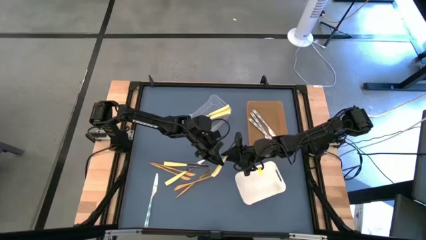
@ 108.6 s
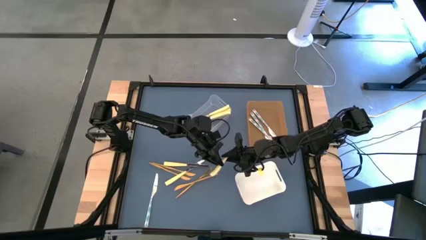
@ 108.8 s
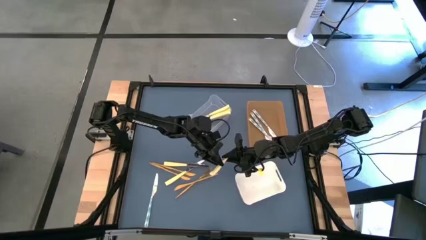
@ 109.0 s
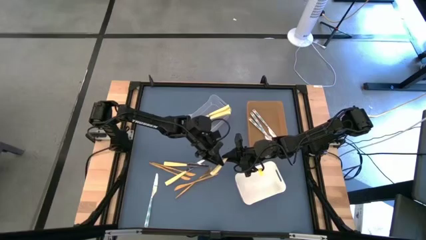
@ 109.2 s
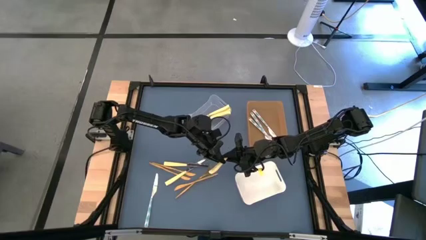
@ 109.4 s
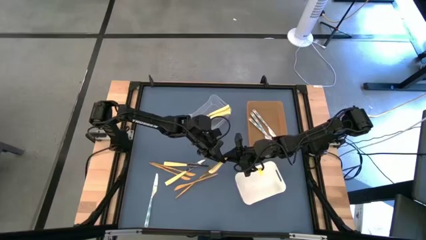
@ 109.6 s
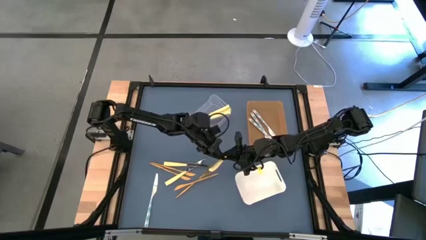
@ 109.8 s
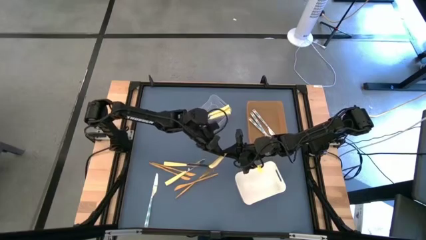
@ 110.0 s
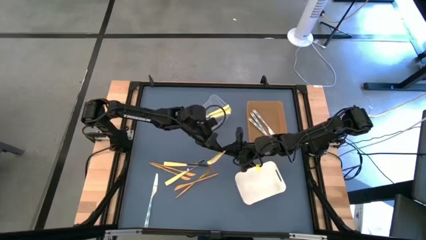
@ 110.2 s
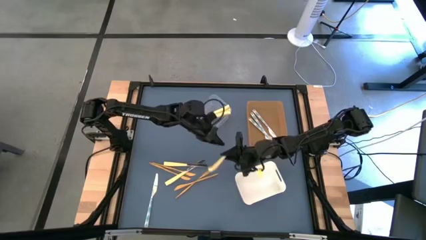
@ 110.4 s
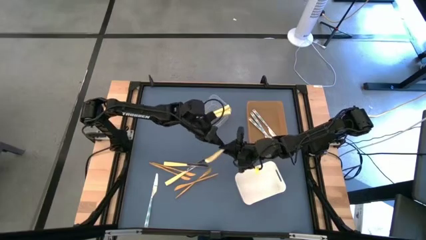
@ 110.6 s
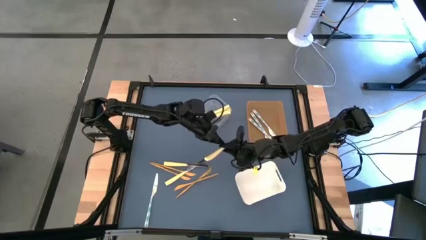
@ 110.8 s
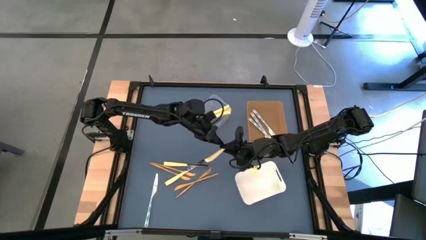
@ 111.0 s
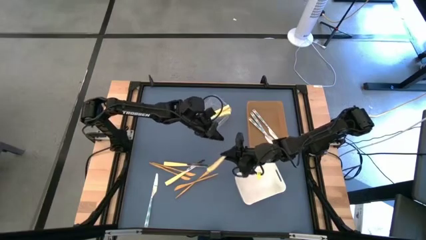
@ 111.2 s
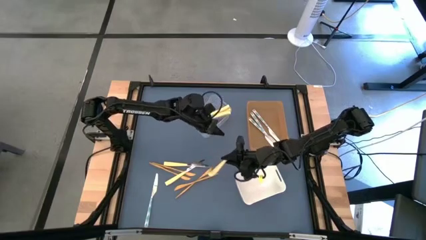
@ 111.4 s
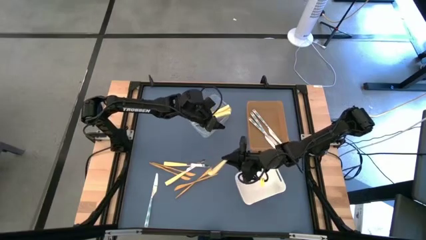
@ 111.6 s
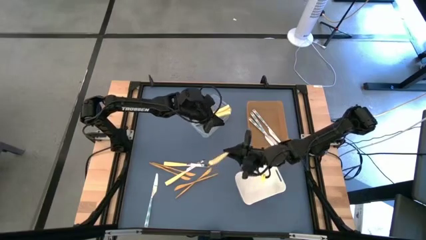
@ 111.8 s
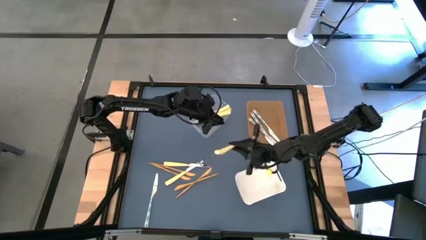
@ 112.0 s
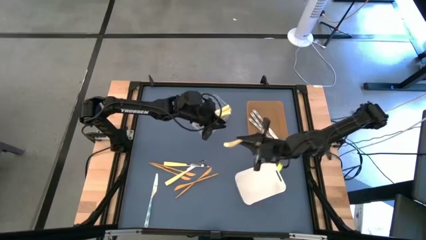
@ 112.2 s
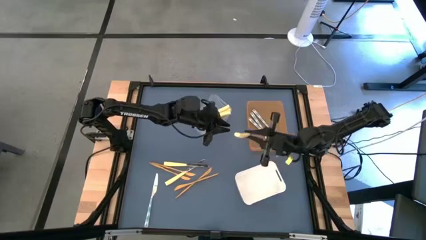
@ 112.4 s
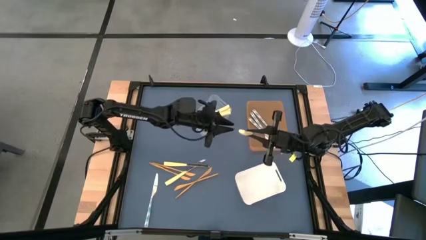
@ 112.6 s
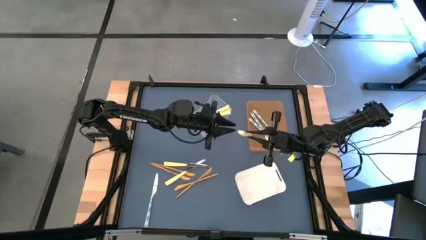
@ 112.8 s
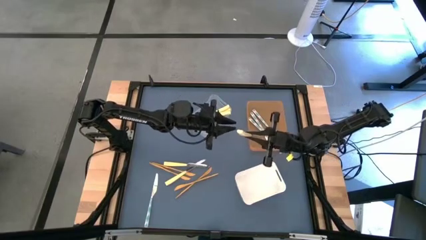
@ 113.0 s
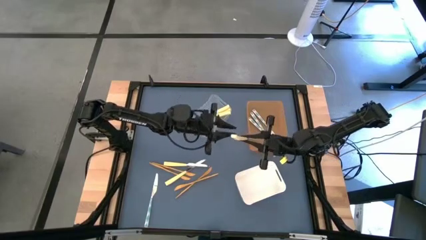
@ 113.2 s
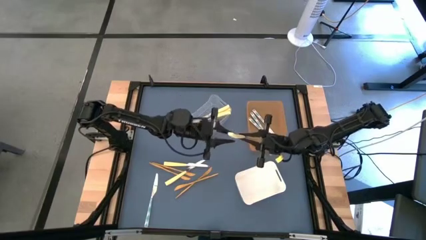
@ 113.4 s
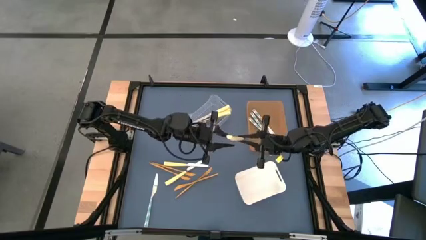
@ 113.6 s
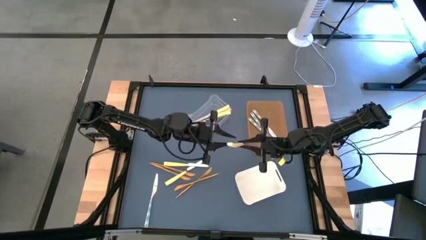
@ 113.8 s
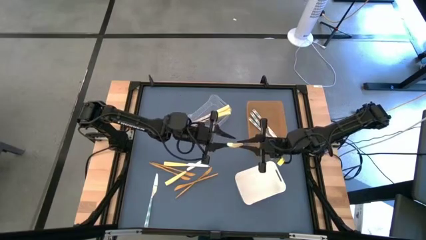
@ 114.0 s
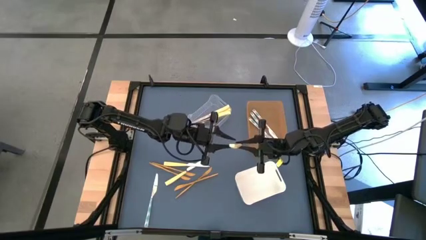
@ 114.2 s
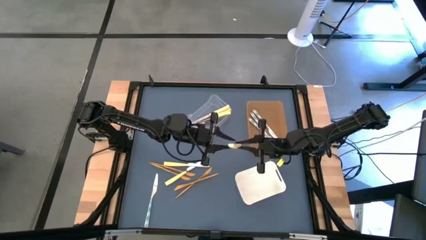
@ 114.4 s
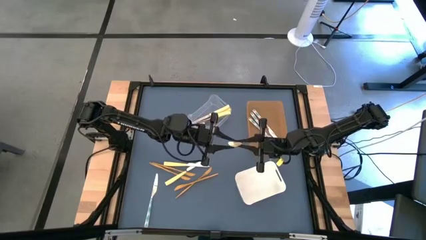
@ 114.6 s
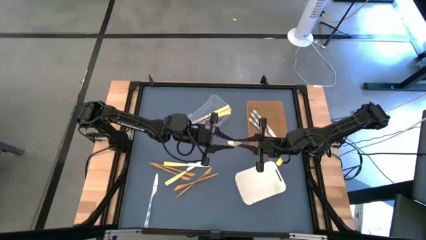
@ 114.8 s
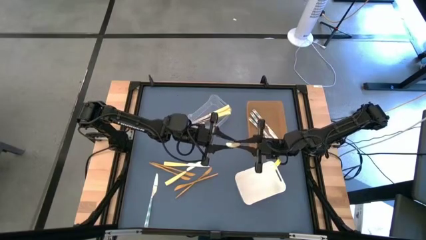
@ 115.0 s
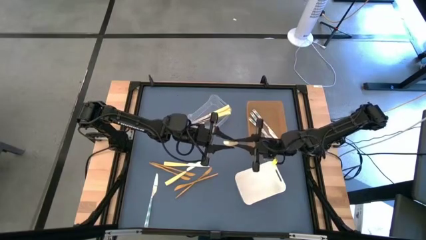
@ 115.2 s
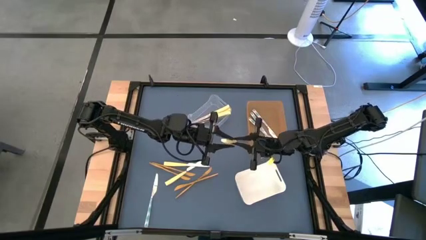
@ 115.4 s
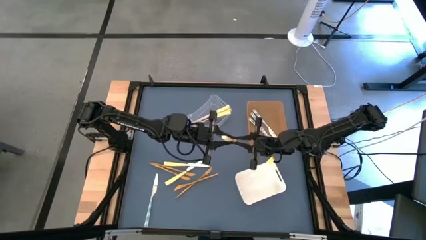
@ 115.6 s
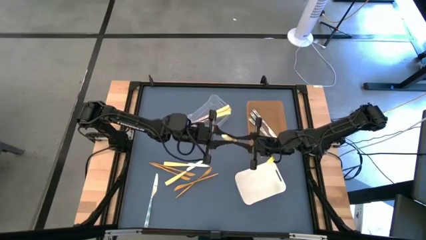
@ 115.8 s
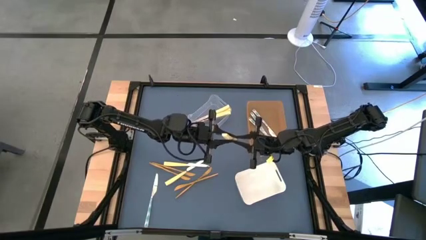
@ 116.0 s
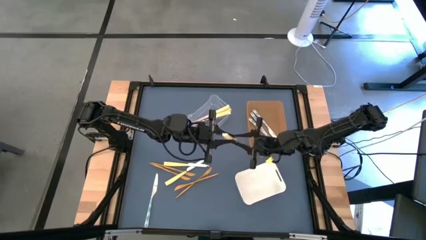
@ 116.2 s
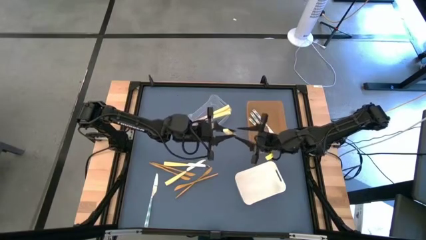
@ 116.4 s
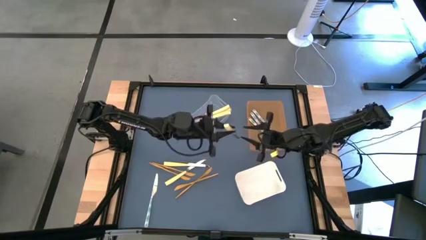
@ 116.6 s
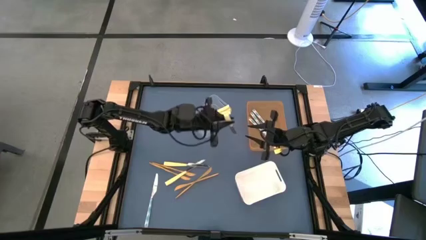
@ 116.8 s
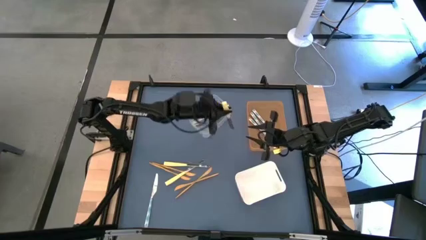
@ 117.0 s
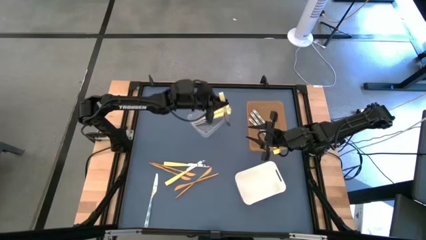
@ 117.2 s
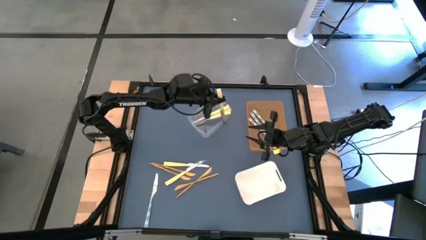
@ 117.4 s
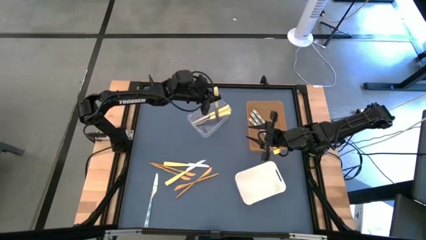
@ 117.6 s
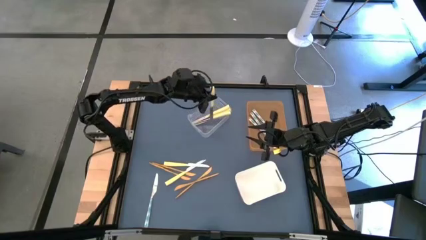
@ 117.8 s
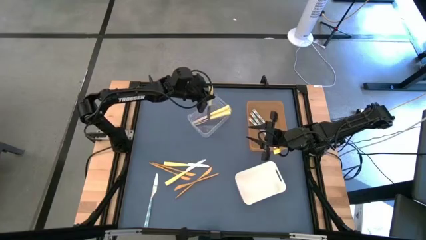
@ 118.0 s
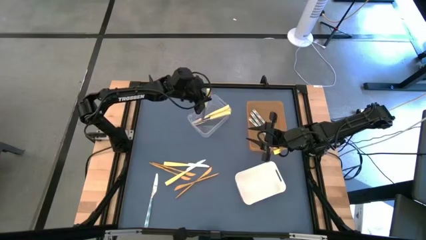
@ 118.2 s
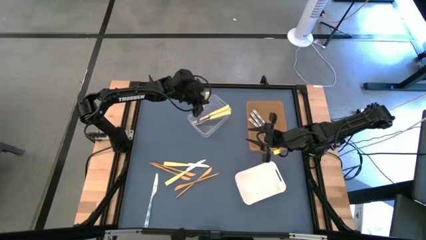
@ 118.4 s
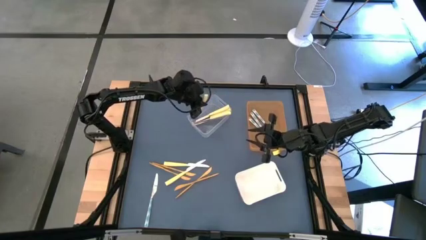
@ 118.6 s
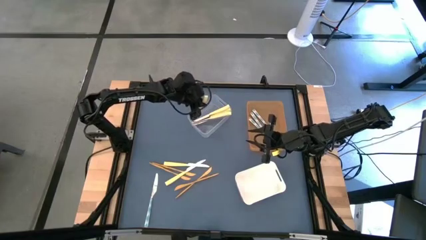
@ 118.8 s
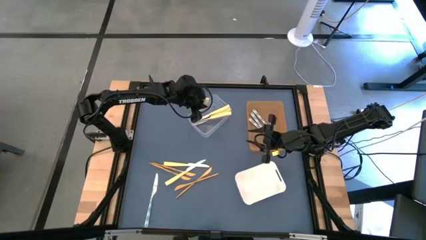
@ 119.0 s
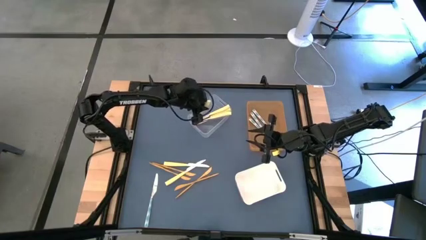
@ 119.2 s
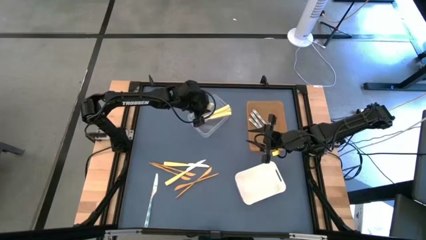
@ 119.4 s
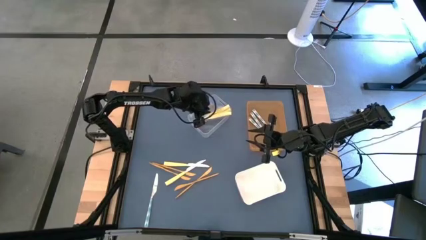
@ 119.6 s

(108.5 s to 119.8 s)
Task: Sort silverware by color (type)
Put the yellow knife into the transparent bin
